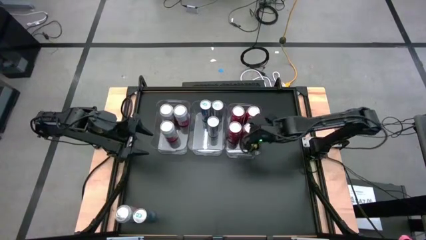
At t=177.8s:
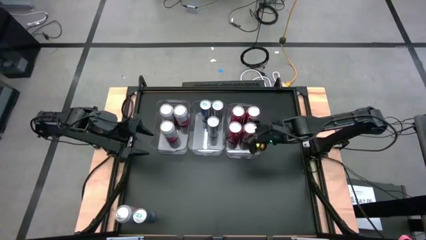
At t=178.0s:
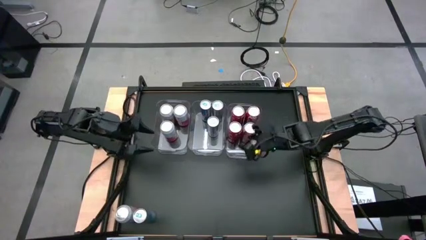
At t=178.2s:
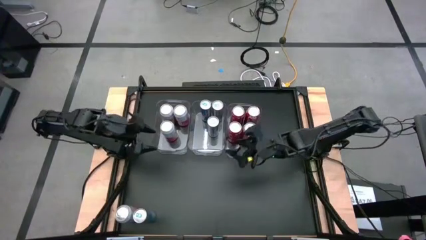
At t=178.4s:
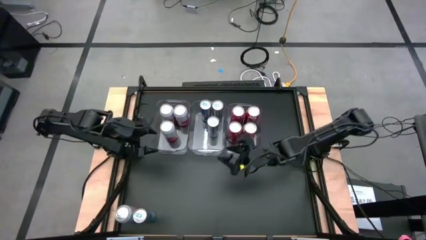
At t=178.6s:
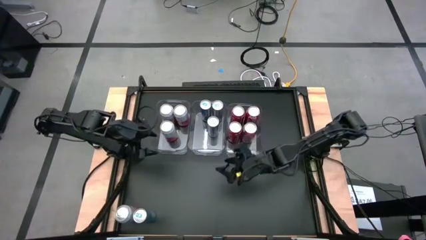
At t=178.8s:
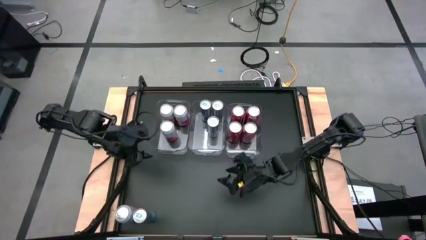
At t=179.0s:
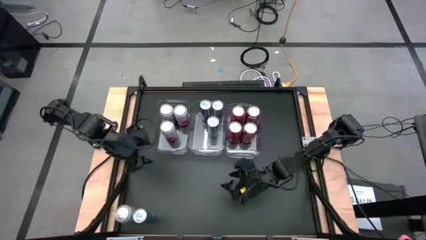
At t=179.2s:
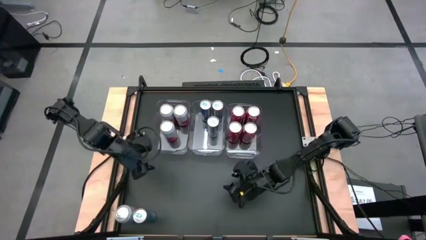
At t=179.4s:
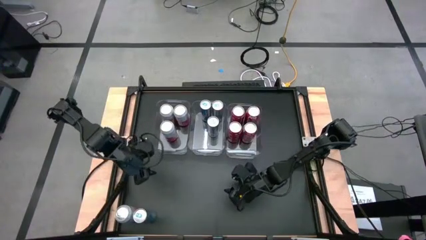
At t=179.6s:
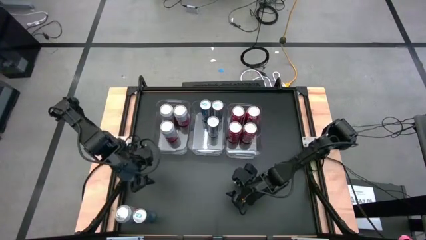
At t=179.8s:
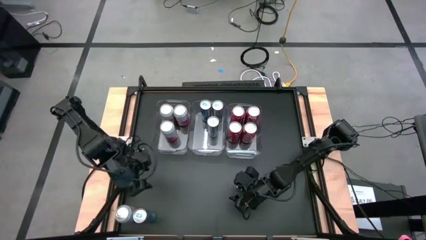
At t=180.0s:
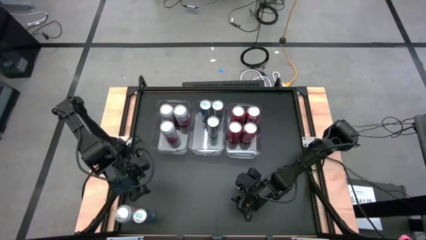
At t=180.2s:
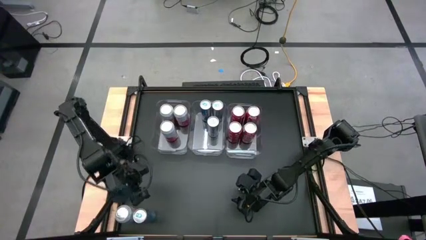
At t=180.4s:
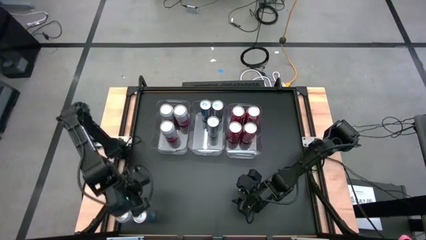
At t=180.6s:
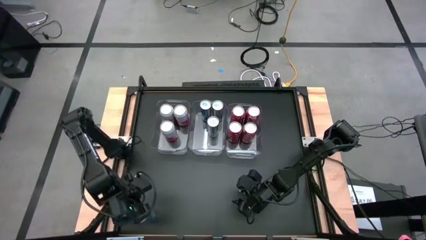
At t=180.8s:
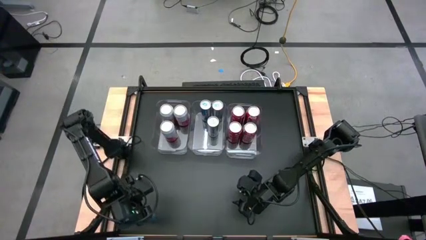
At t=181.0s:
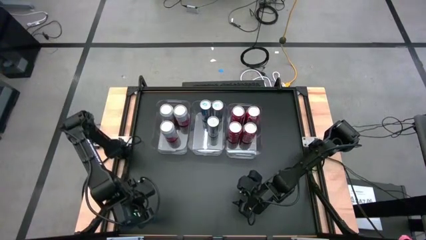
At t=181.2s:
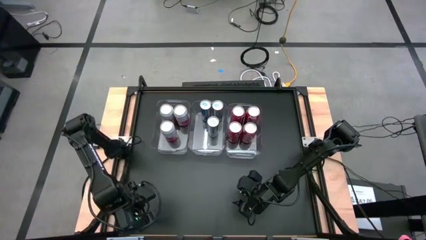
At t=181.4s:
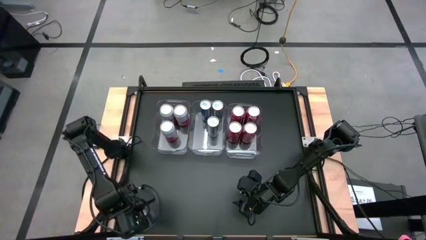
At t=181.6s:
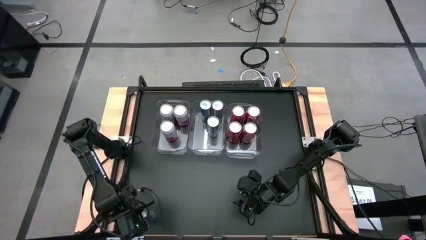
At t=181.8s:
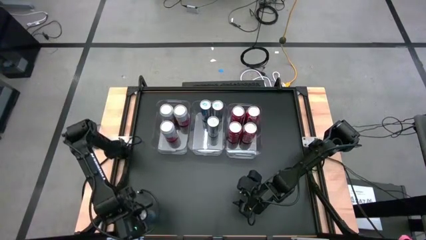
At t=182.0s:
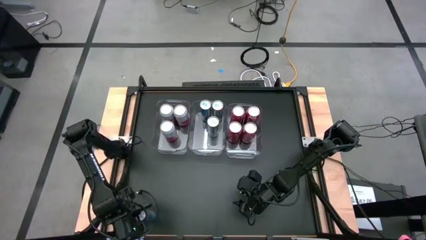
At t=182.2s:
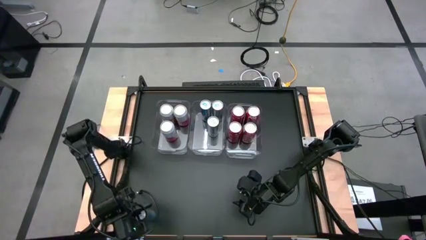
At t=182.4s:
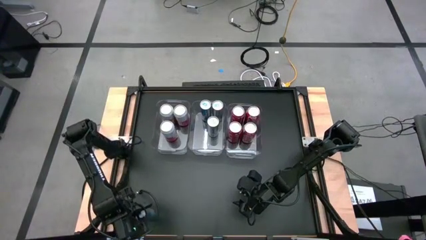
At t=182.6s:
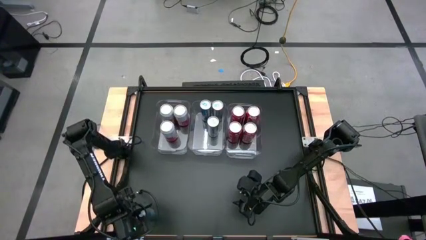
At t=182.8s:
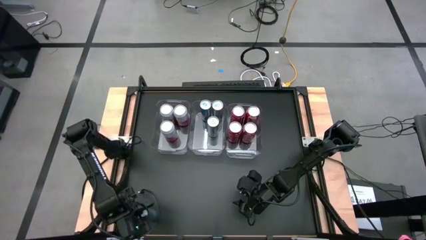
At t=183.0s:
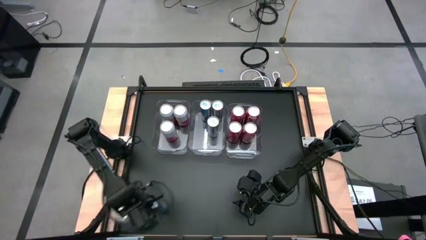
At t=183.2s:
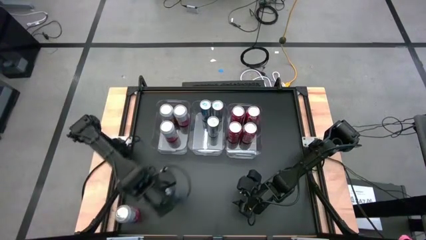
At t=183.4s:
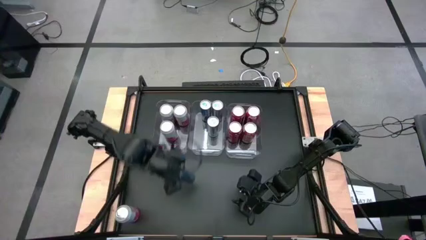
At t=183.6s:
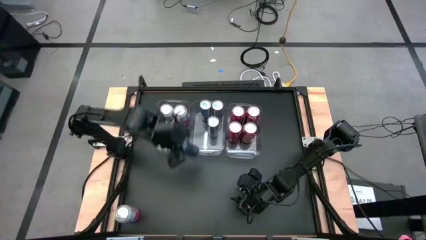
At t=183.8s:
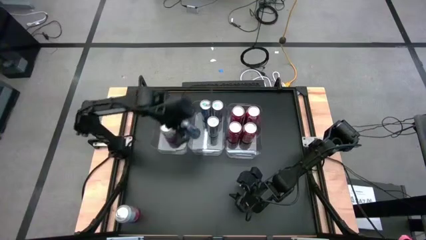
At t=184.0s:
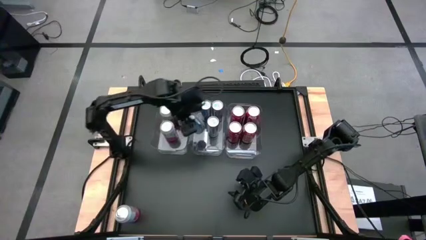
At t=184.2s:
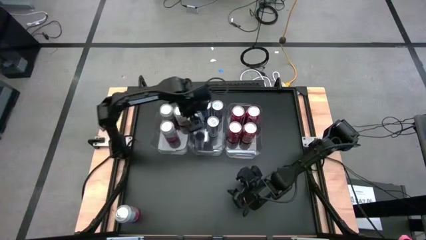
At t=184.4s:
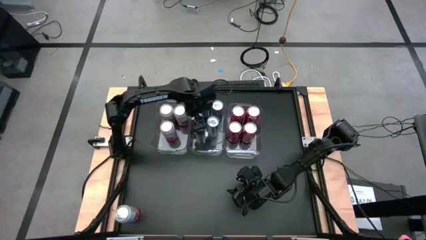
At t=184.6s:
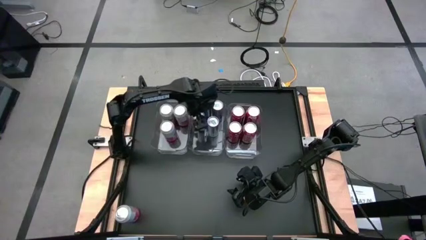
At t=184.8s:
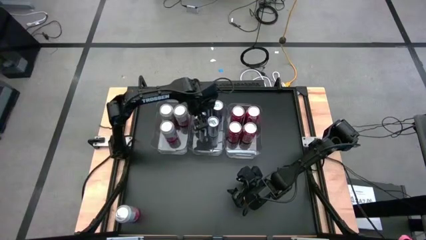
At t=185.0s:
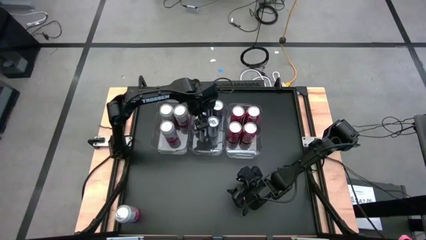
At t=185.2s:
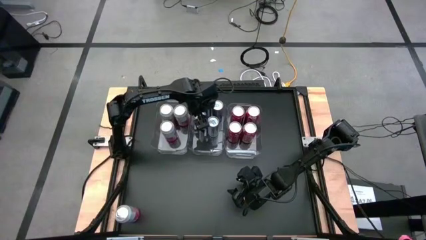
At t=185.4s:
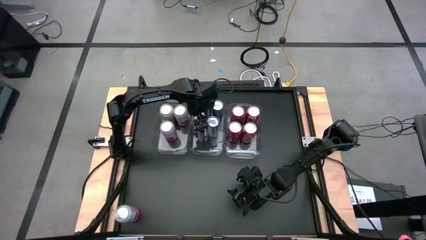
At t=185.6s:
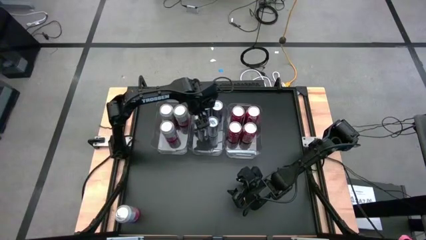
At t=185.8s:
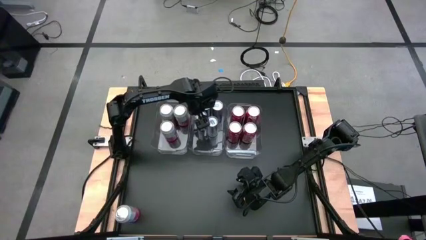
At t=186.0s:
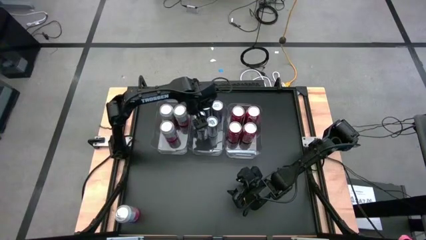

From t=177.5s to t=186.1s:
Task: Sort soda cans
Put the blue soda can into the center transparent bin

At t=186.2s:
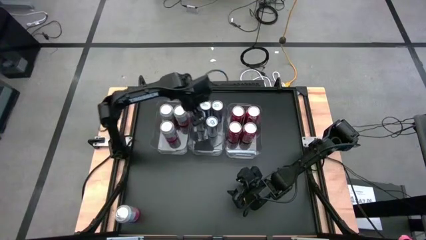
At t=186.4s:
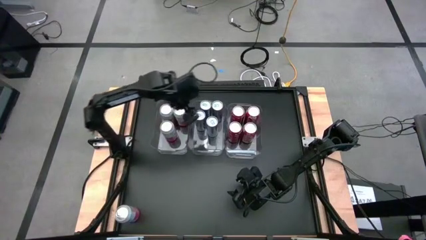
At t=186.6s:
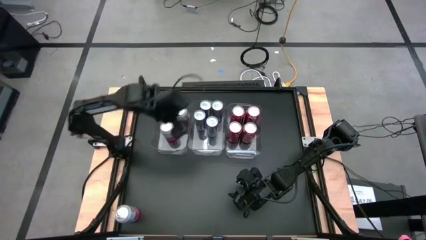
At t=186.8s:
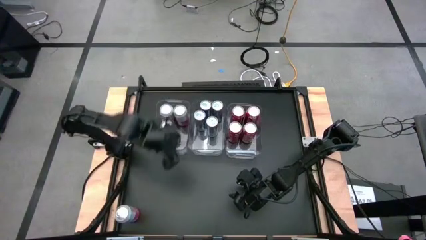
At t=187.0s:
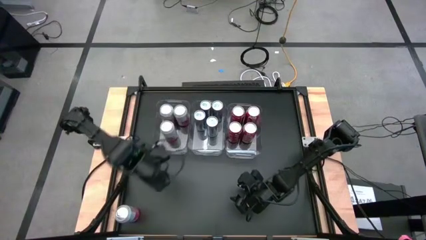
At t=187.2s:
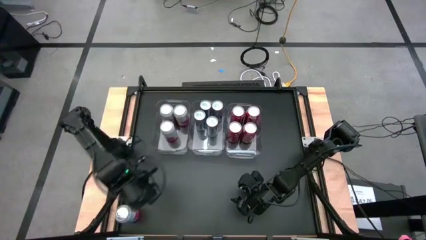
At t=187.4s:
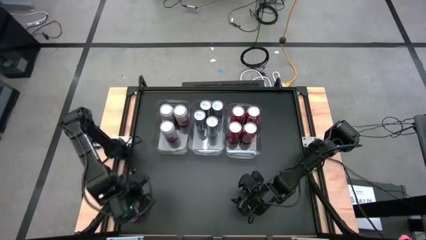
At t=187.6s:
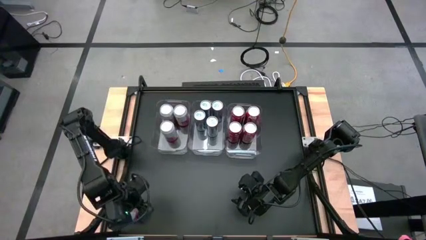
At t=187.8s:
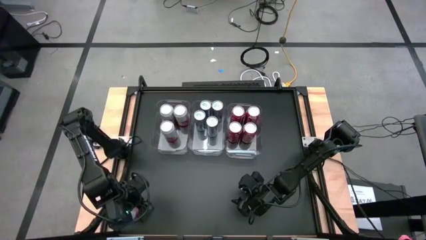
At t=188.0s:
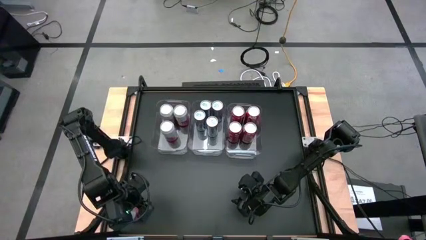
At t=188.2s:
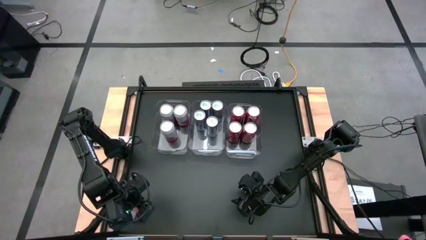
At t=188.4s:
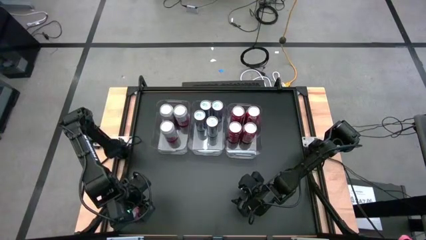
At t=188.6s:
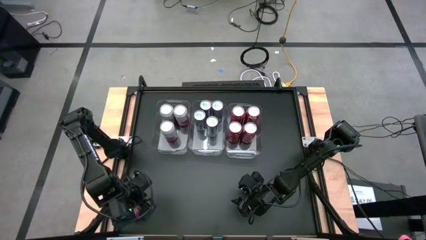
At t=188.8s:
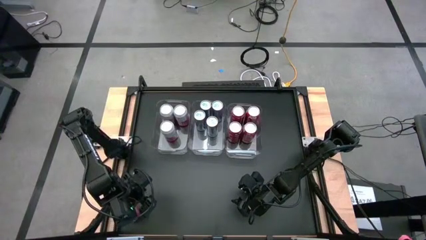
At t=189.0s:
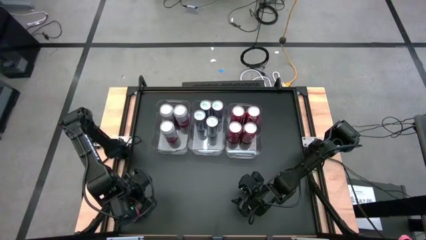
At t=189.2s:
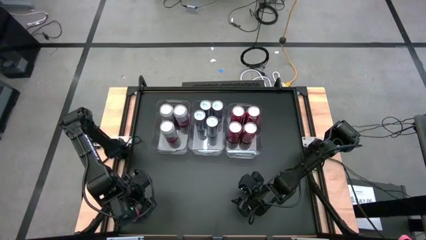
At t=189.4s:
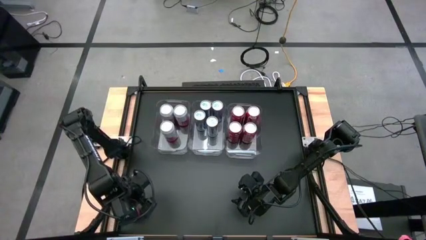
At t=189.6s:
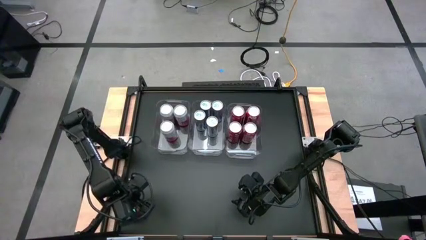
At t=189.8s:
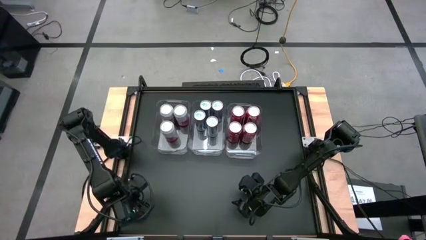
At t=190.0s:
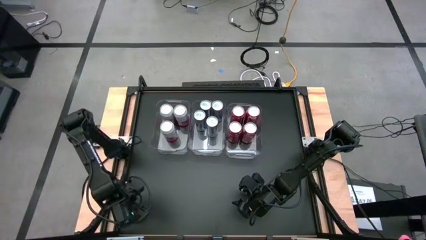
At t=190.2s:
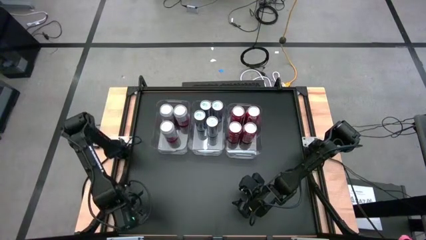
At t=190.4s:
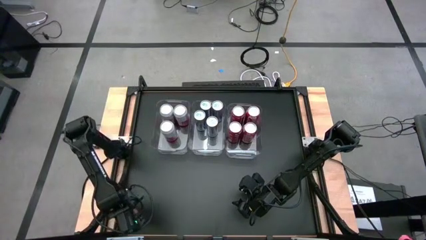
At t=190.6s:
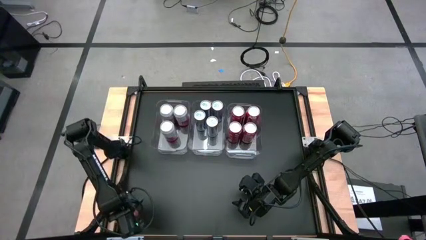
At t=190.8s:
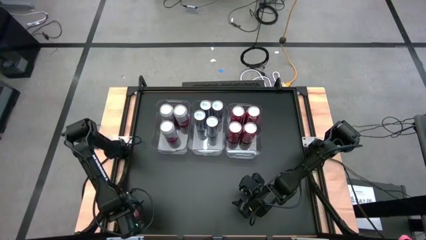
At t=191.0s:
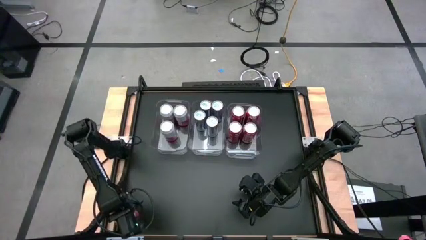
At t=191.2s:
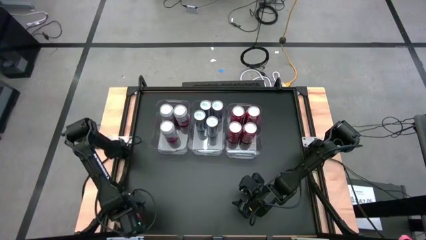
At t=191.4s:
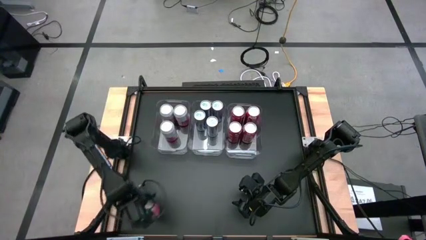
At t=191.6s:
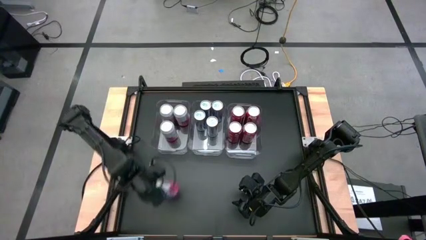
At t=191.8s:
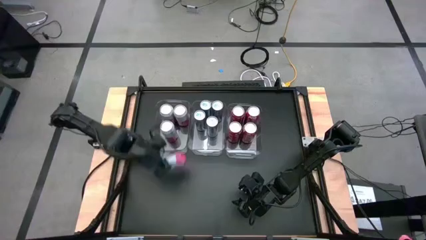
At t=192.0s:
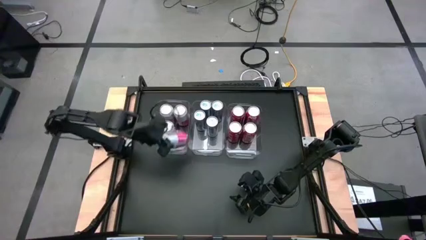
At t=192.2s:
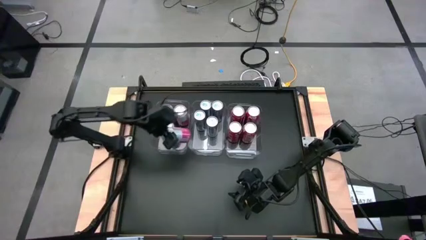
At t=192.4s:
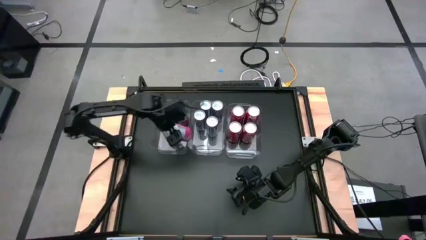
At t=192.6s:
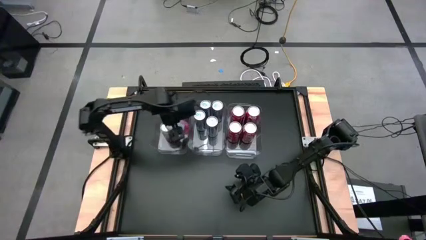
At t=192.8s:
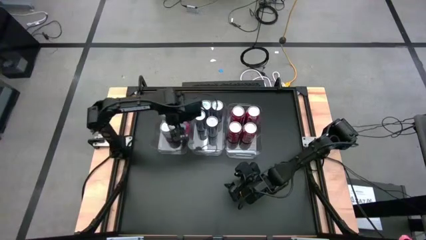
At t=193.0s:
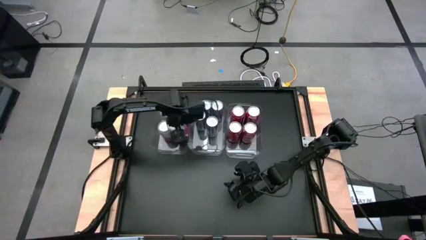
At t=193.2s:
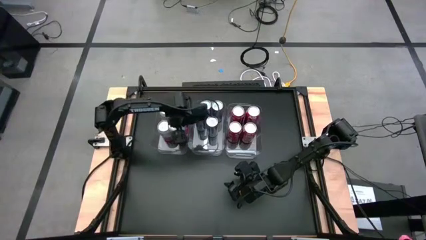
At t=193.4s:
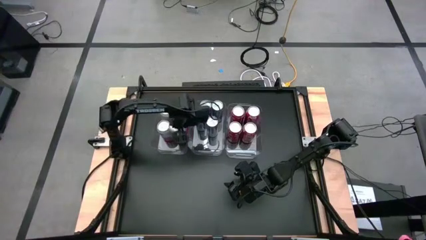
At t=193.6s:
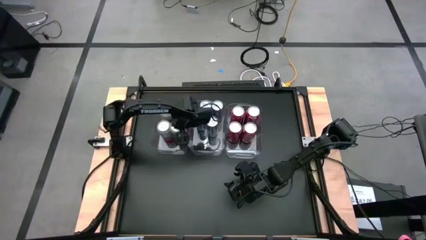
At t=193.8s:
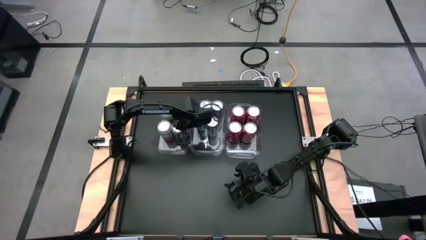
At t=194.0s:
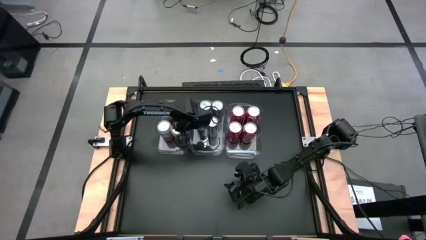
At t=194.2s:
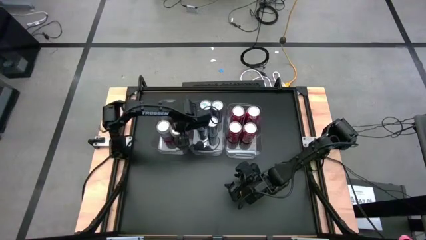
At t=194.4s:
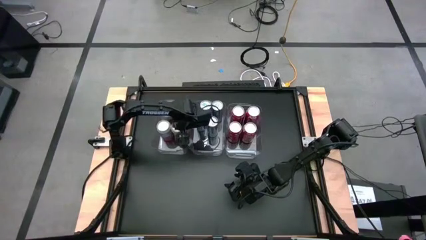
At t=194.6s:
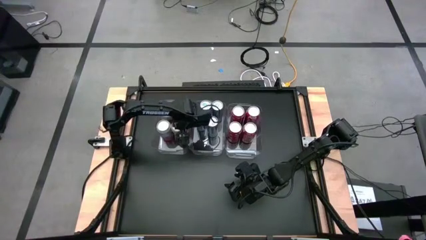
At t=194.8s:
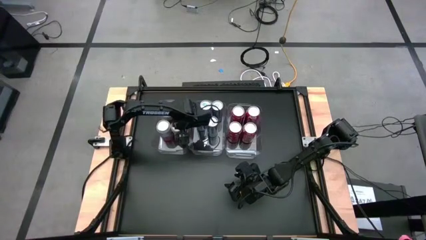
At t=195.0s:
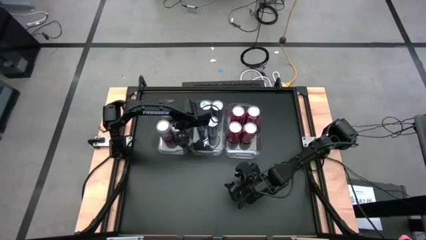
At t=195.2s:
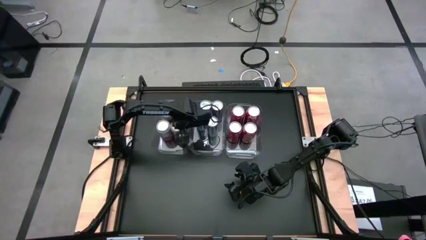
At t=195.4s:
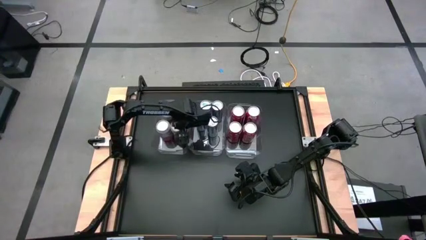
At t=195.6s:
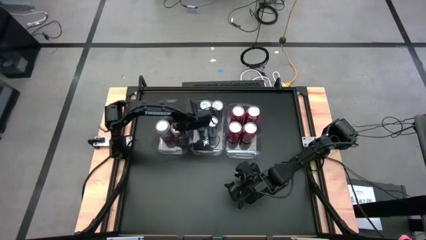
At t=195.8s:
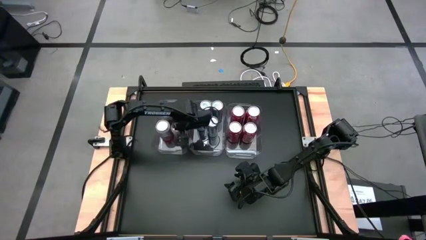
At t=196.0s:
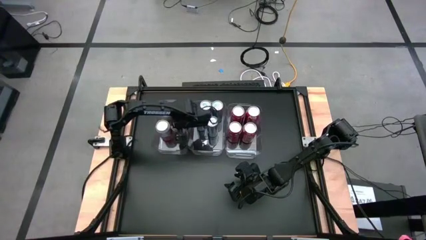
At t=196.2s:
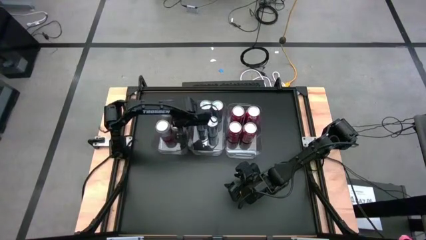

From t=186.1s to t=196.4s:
Put the pink soda can into the left transparent bin
